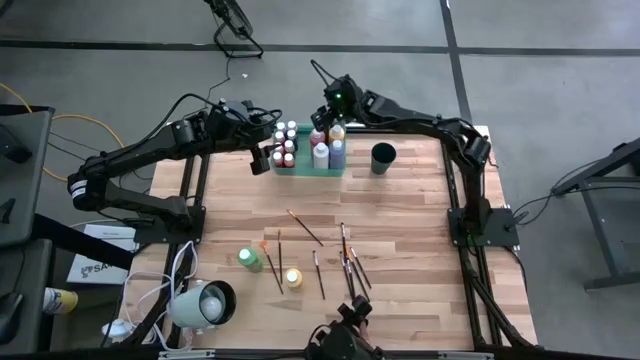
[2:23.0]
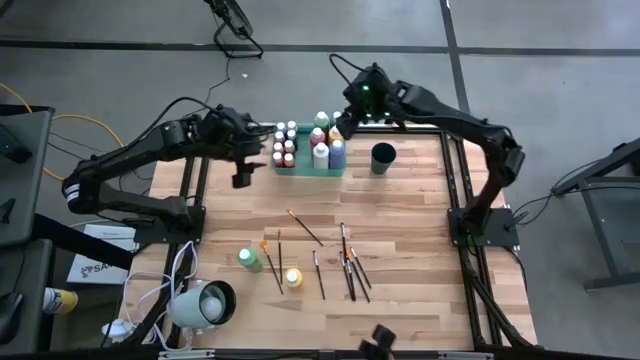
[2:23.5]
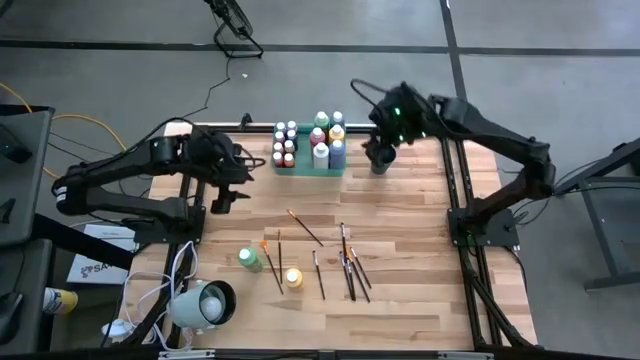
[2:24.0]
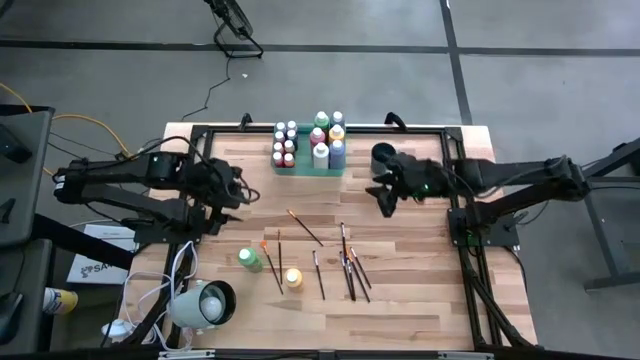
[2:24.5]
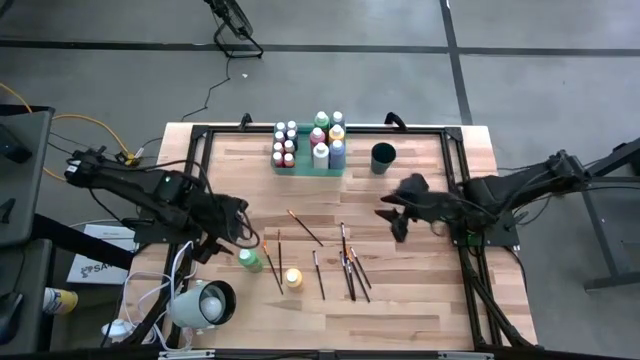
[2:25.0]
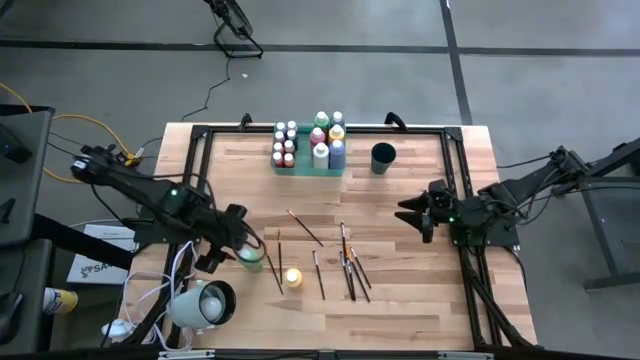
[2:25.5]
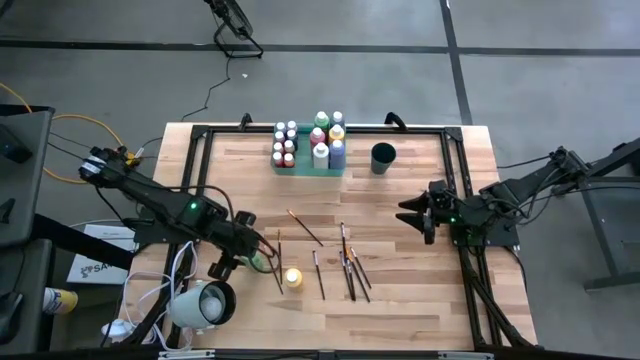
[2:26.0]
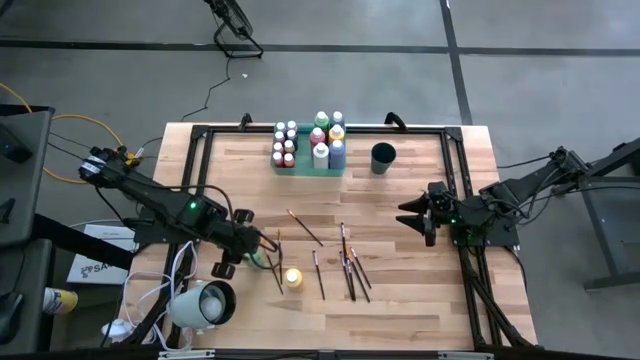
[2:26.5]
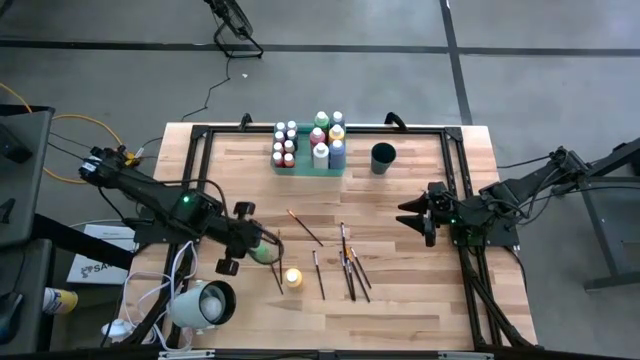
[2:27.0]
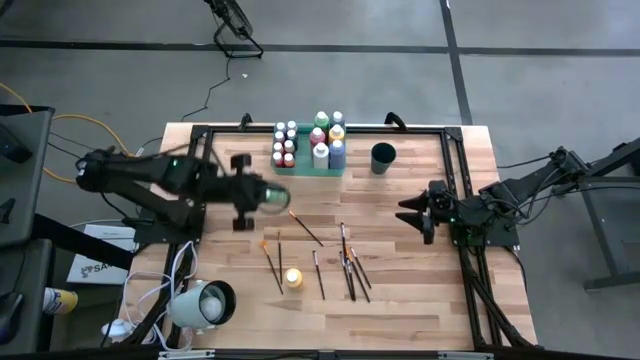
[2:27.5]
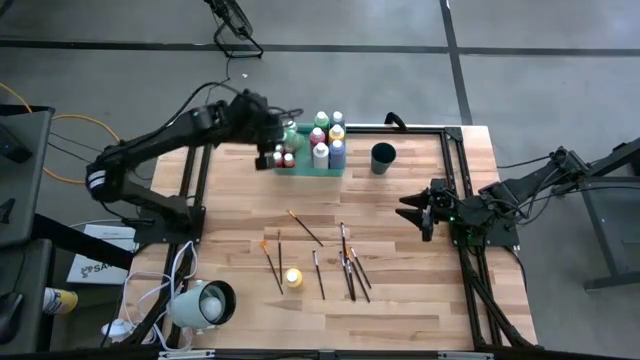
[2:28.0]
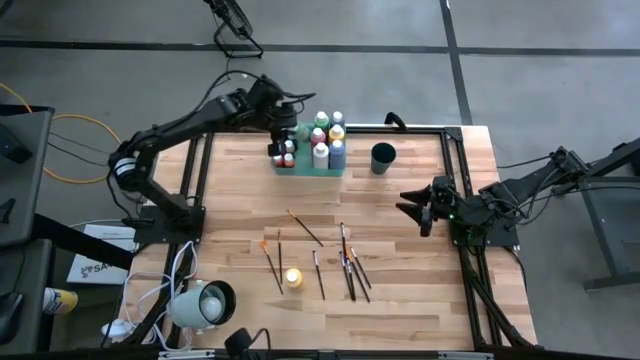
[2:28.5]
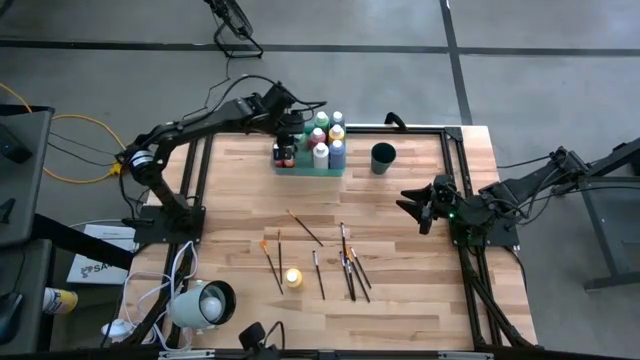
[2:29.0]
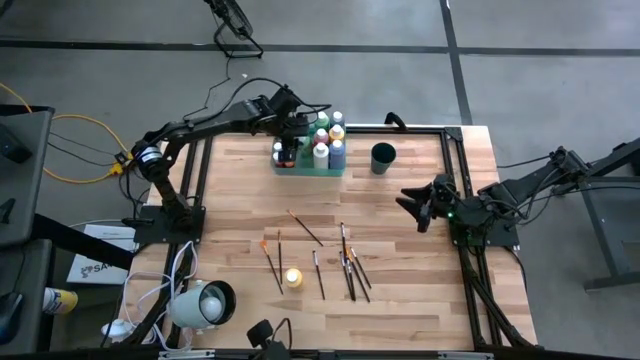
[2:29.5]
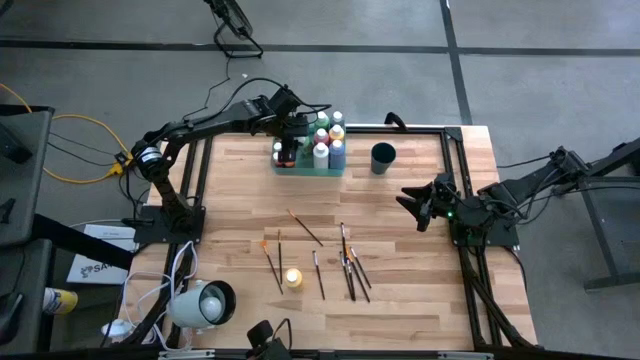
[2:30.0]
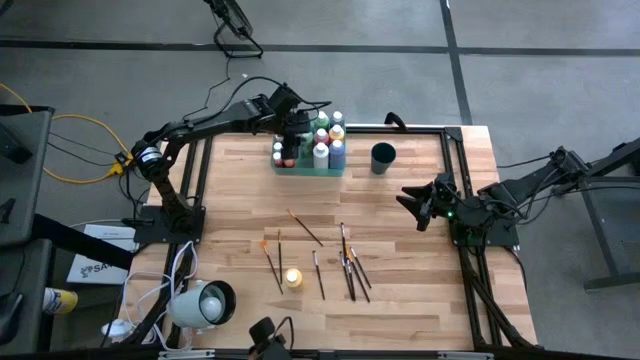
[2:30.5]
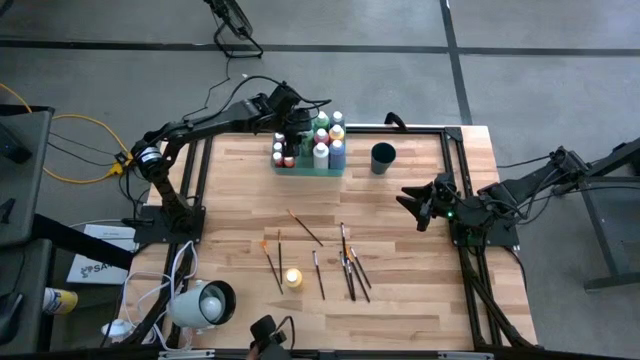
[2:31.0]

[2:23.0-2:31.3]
Task: Pick & Place Paint Supplies
Put the green paint bottle into the green bin

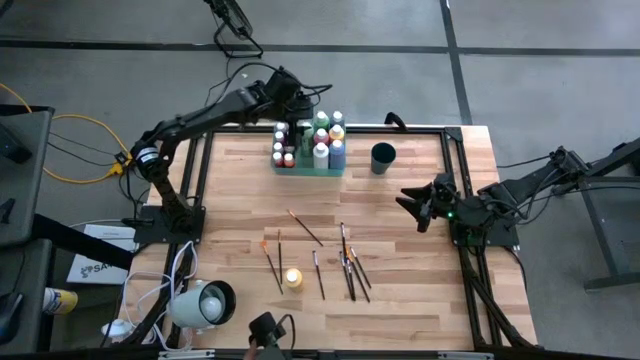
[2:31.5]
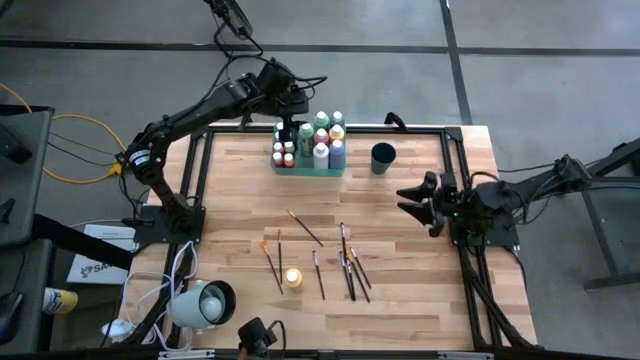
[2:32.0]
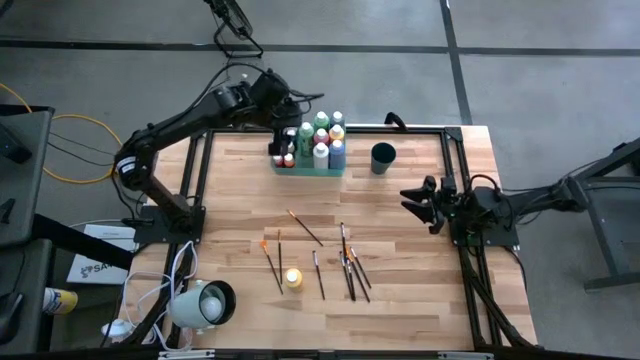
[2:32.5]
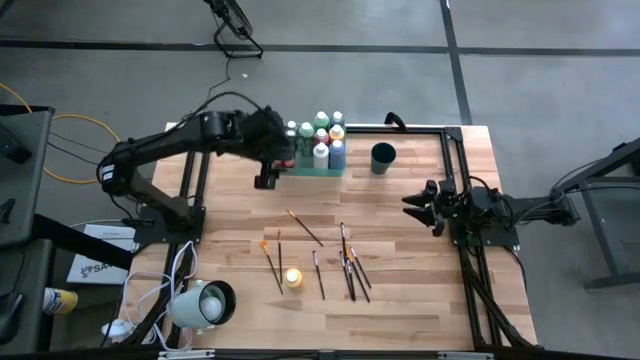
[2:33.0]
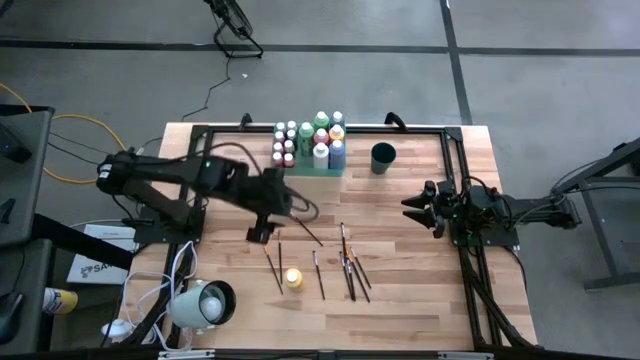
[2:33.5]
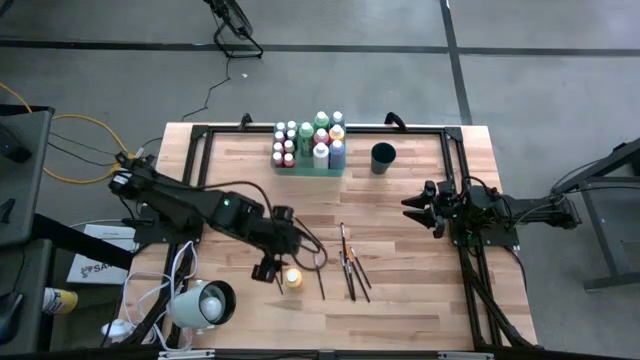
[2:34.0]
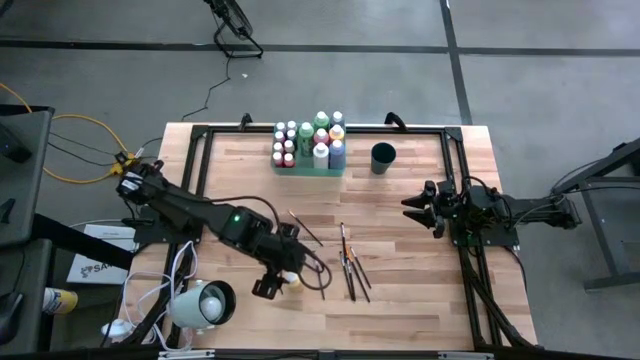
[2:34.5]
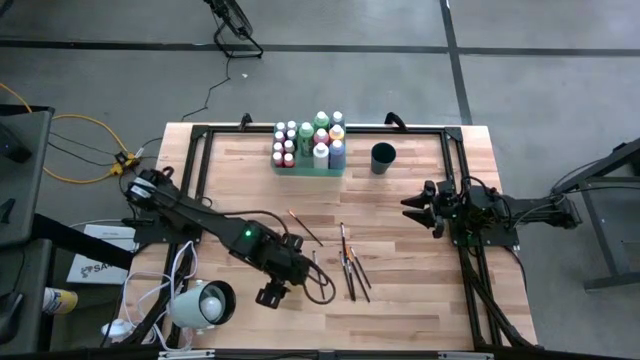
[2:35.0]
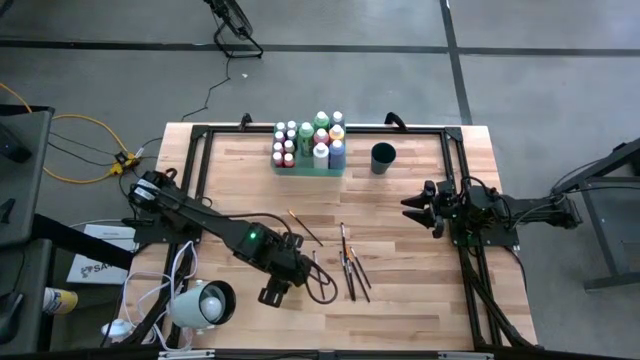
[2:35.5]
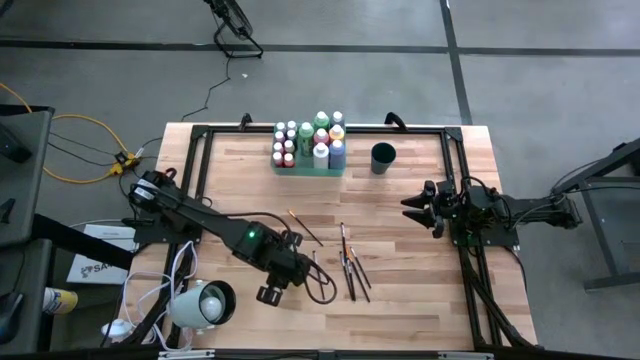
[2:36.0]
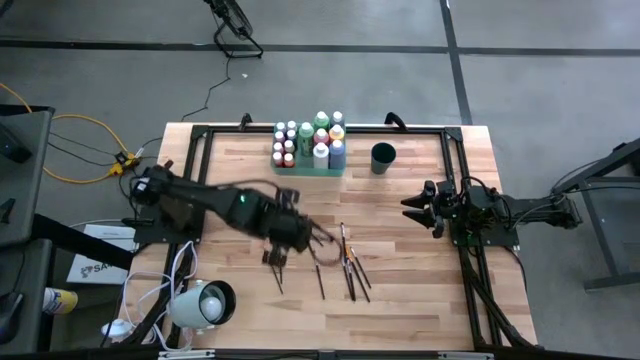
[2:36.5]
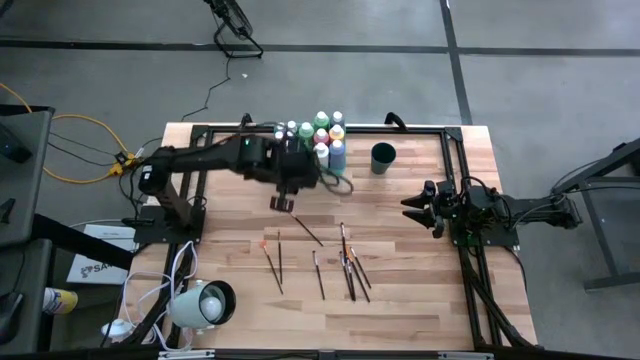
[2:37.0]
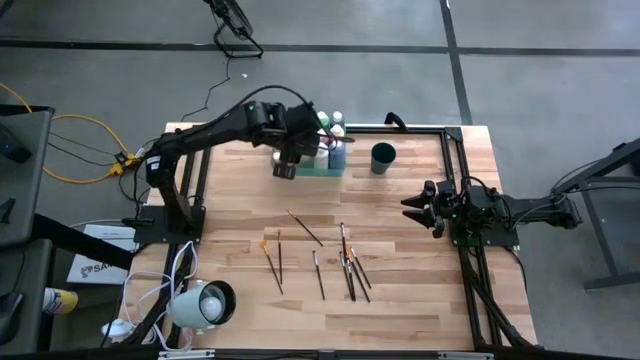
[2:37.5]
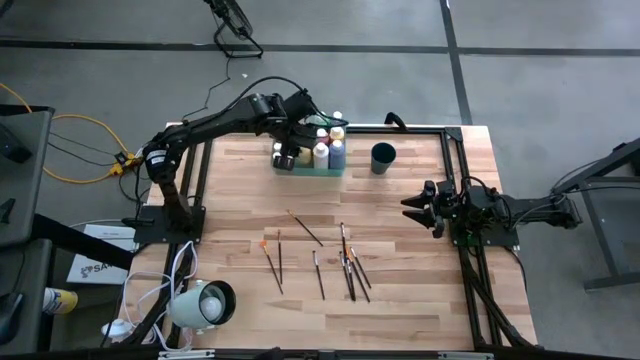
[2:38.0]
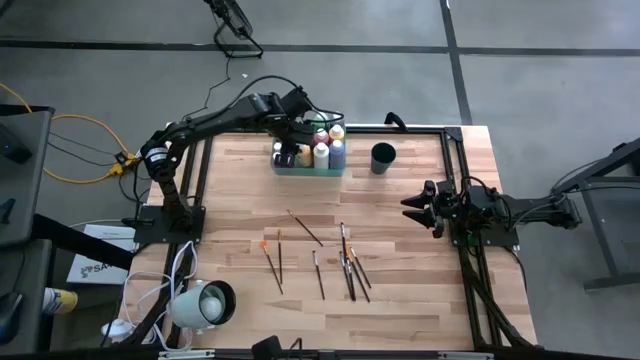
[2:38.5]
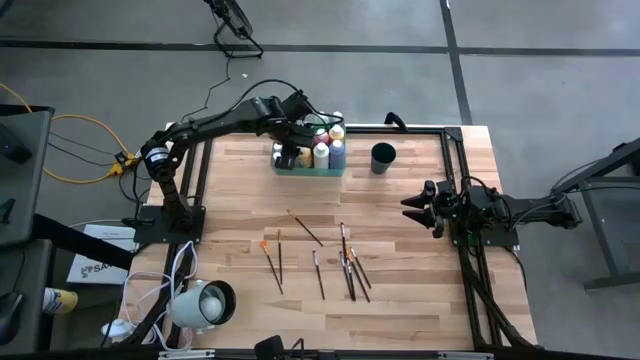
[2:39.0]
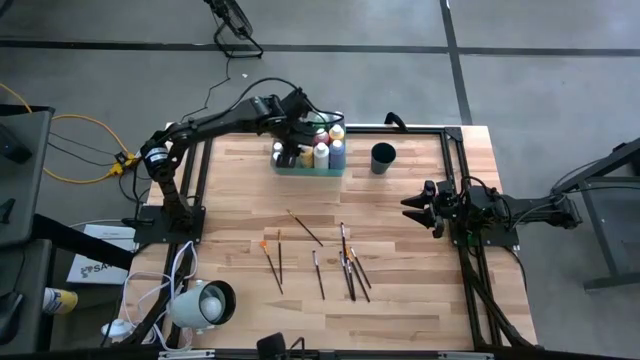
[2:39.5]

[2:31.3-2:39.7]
Put the large yellow paint bottle into the green bin

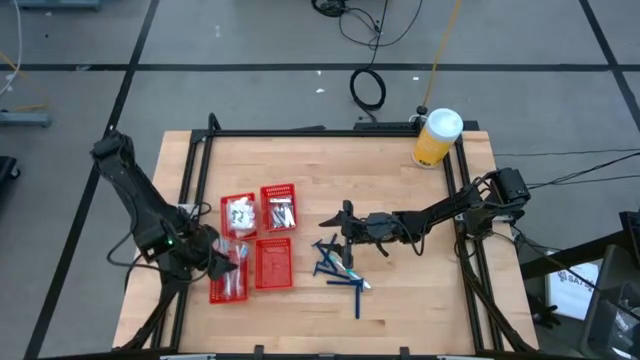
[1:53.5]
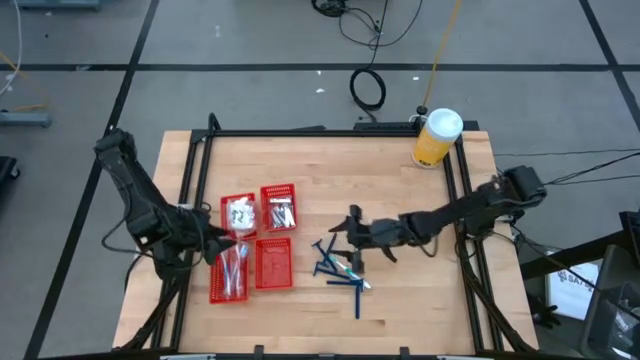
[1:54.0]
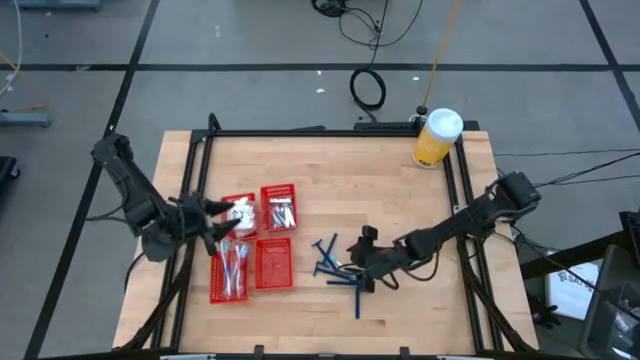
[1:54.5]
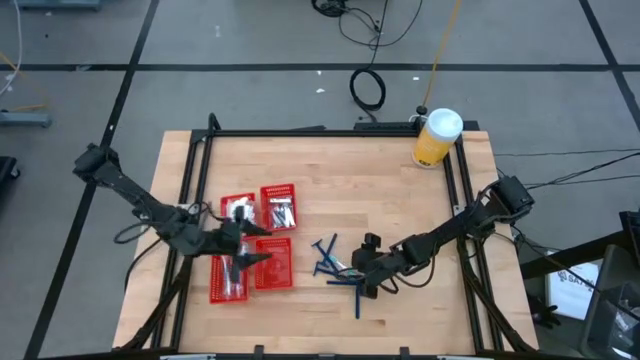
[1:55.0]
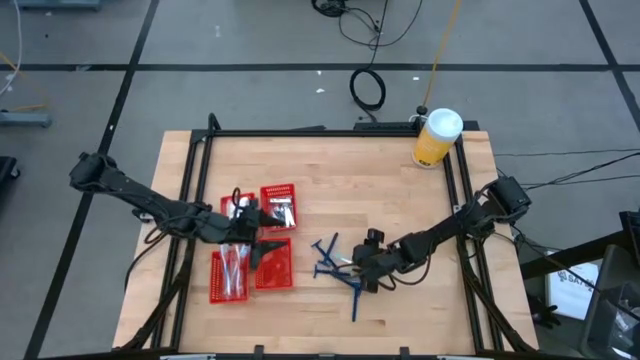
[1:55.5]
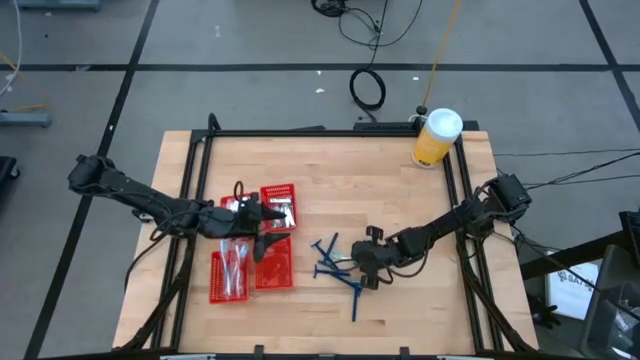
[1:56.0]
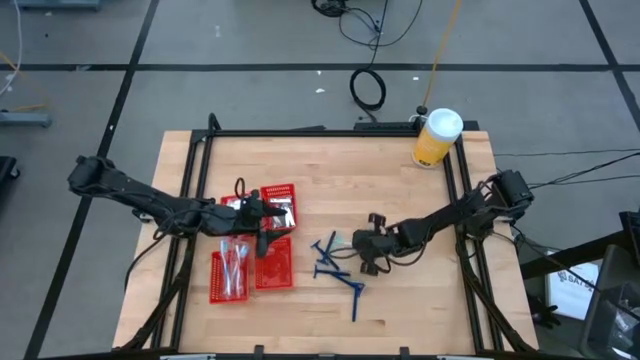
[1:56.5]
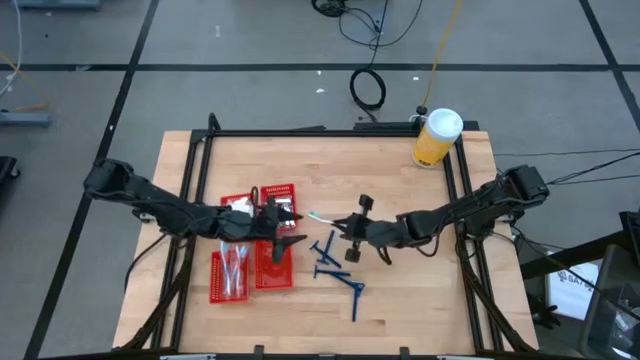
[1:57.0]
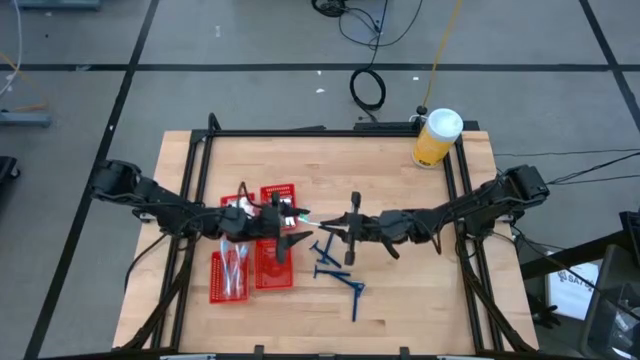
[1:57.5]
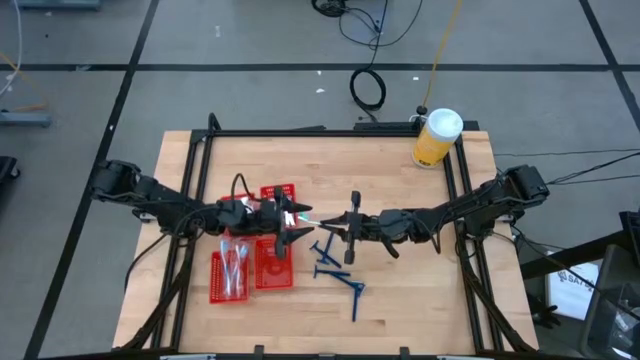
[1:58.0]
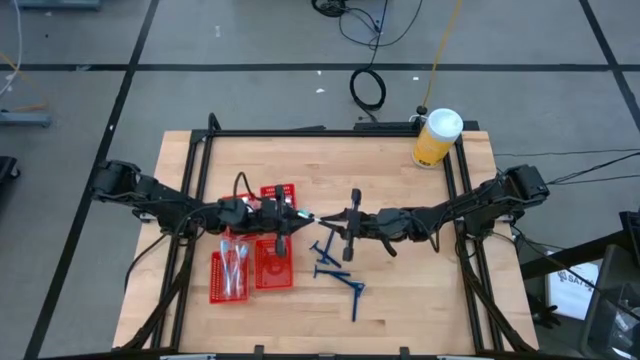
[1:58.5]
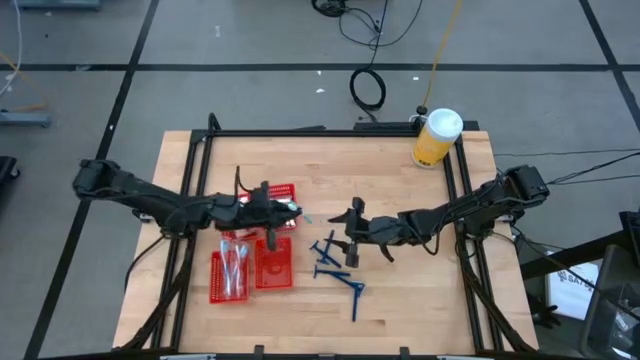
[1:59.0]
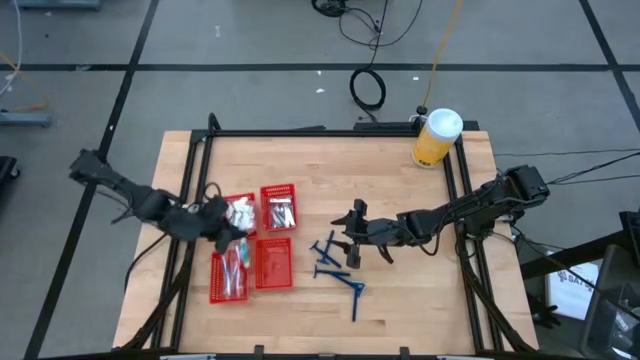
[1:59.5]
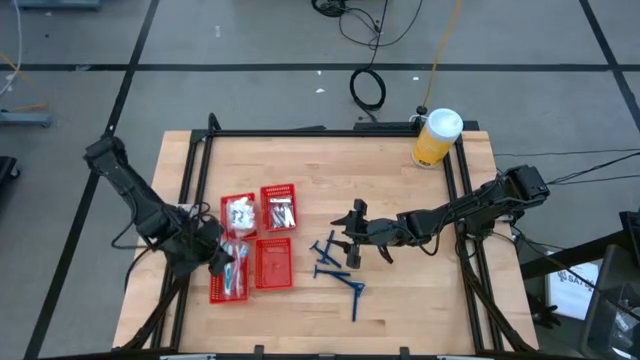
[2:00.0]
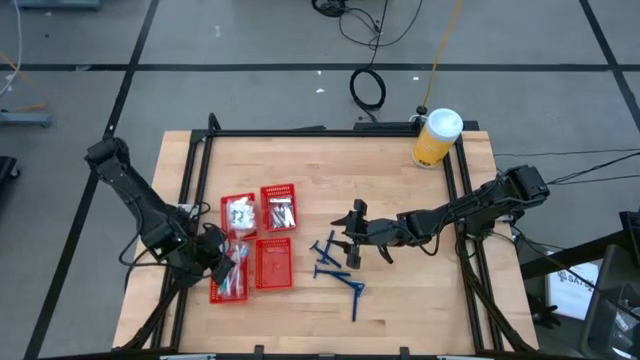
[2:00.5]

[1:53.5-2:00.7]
Task: Pick & Place Travel size toiletries
Put the blue toothbrush into the bottom left red basket
